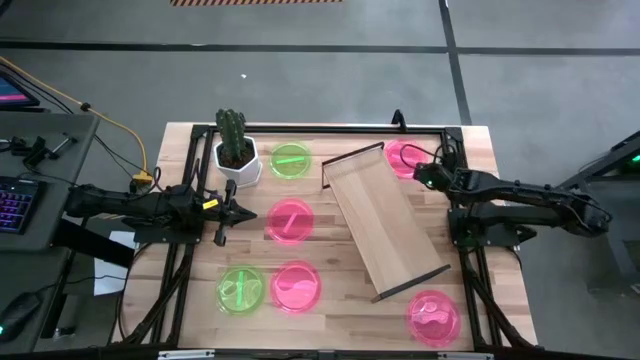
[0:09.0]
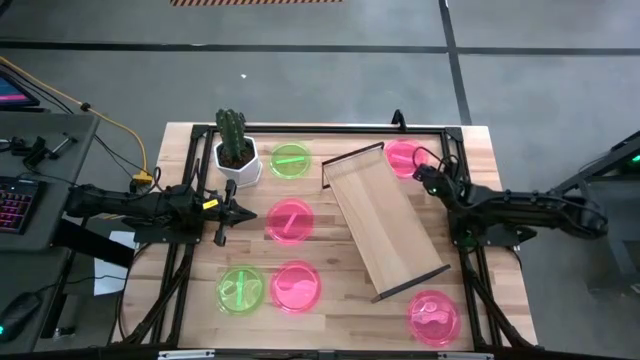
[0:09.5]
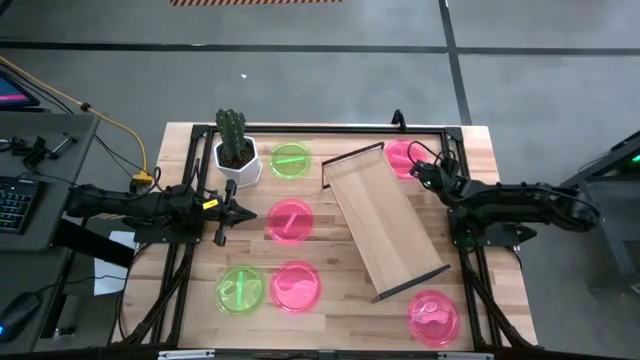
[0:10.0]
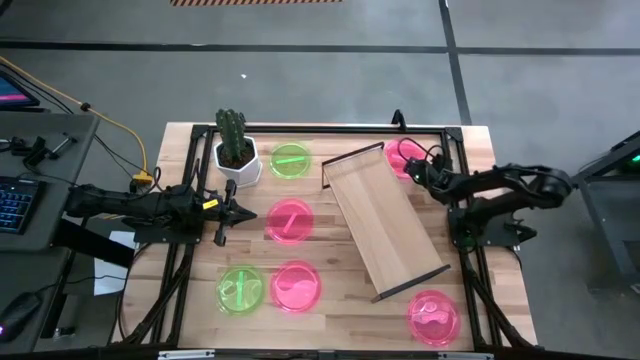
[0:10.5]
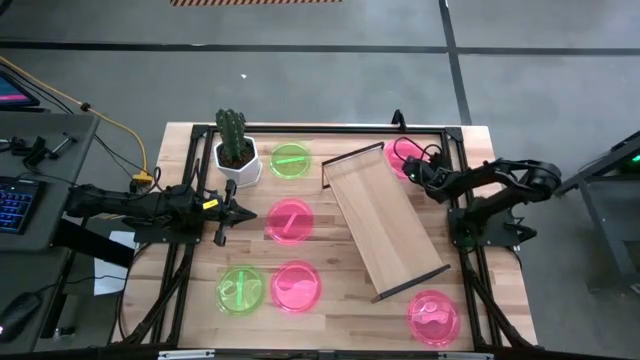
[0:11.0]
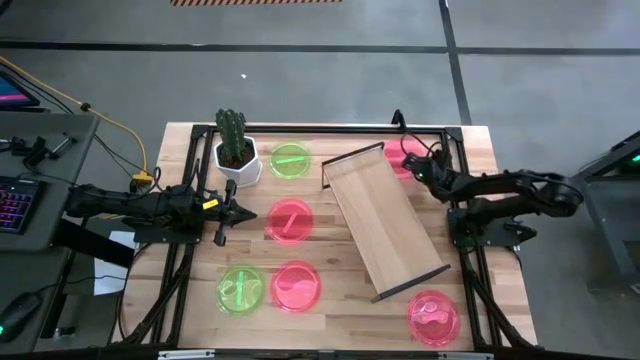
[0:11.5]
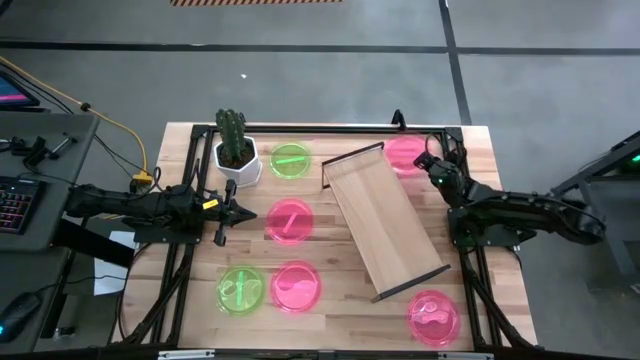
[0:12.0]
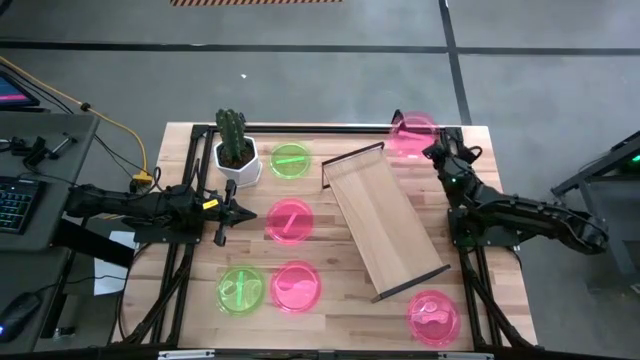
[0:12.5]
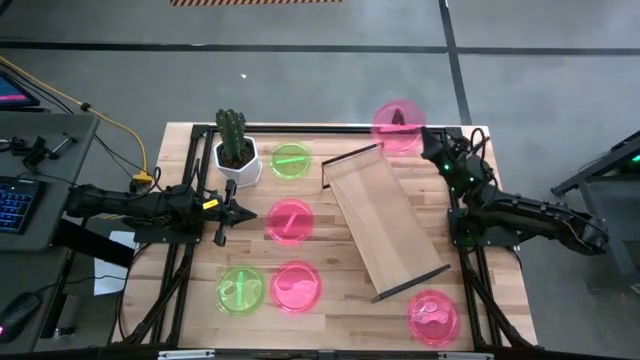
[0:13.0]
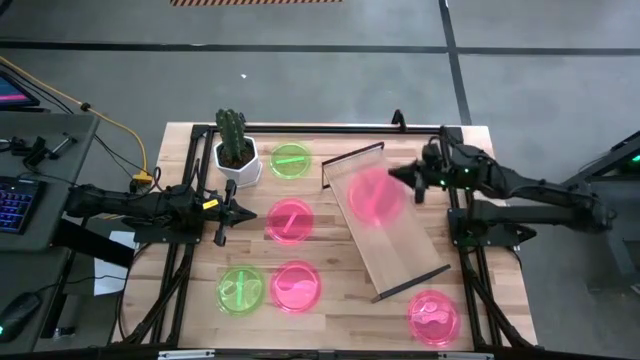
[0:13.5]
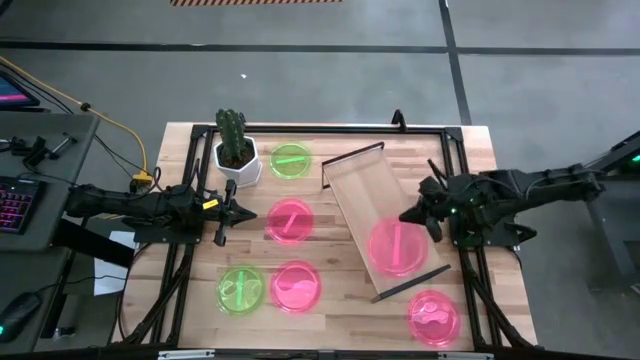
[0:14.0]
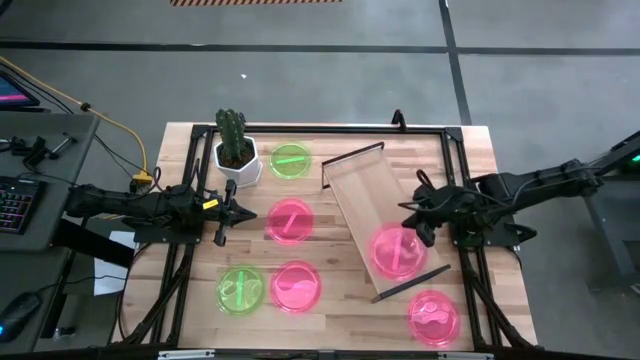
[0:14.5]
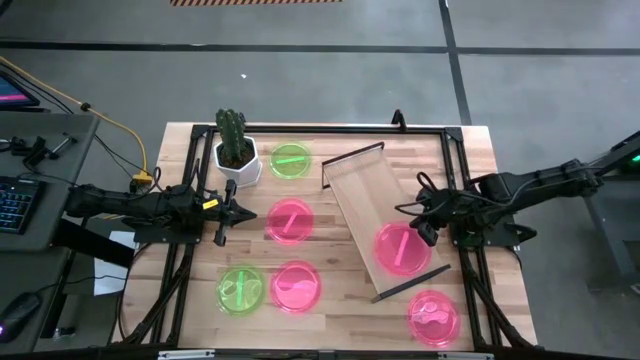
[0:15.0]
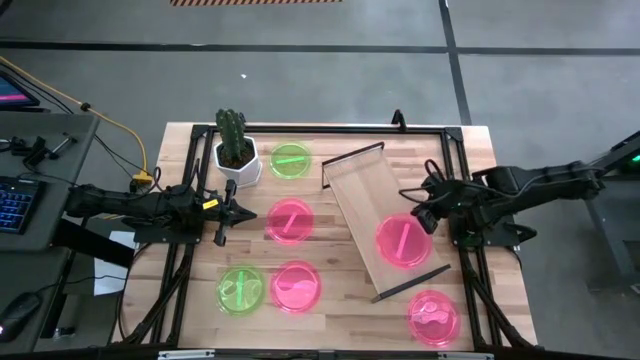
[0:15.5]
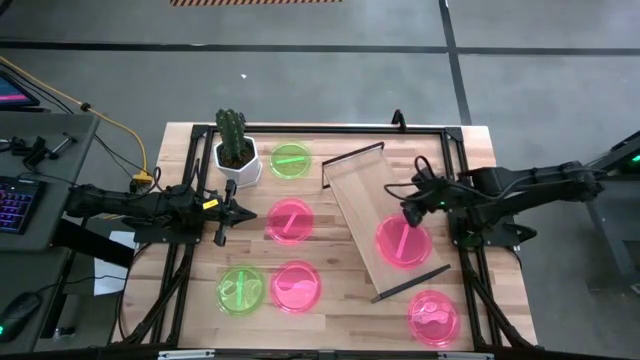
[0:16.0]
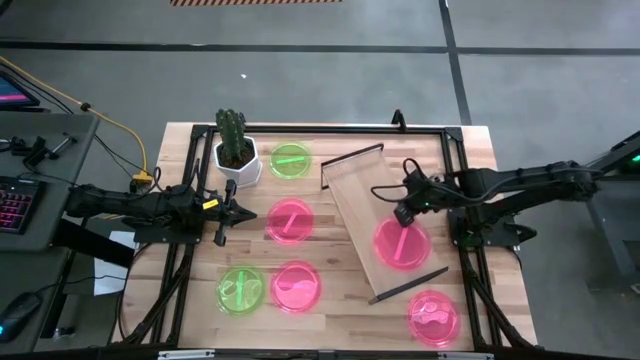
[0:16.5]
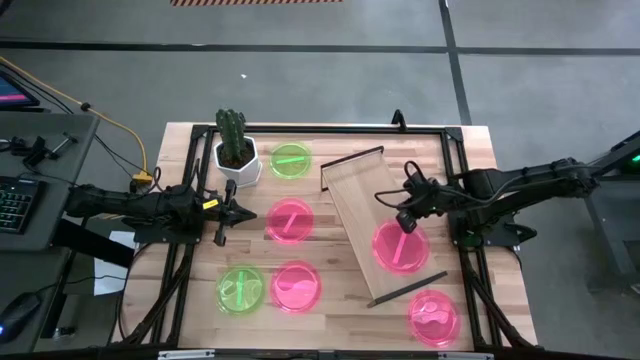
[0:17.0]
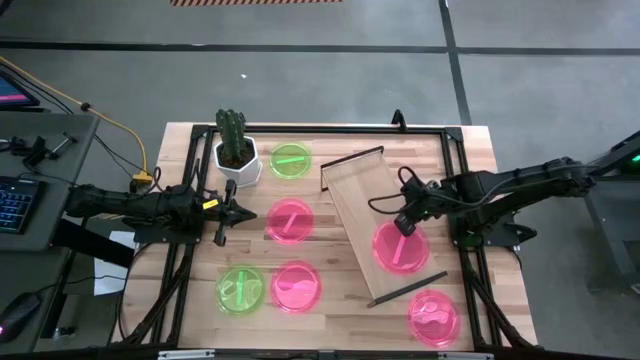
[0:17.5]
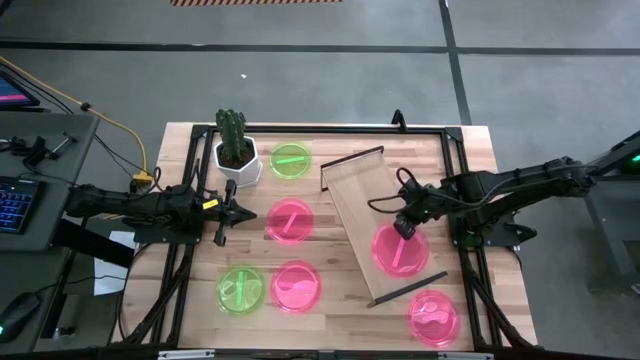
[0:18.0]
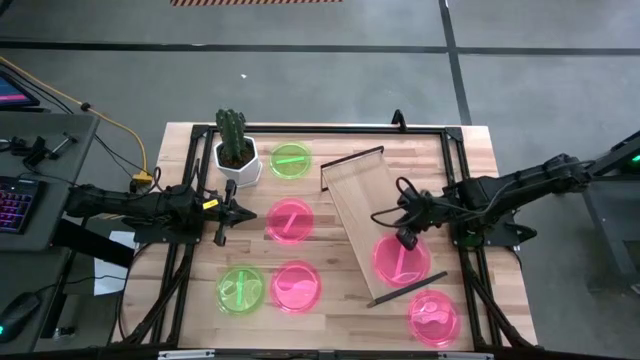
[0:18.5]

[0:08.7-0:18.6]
Task: Place and stack plates onto a shelf
Put the top right pink plate on the shelf

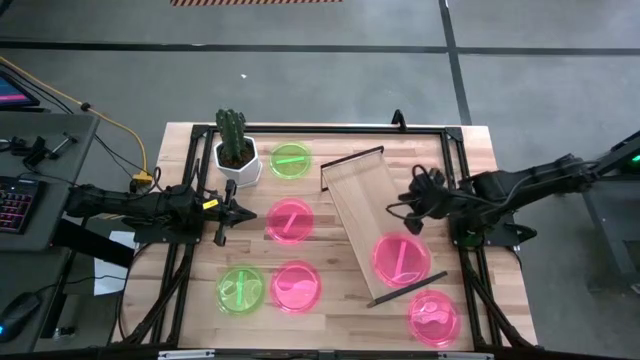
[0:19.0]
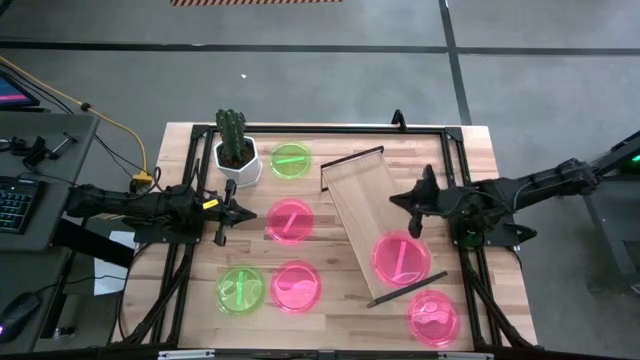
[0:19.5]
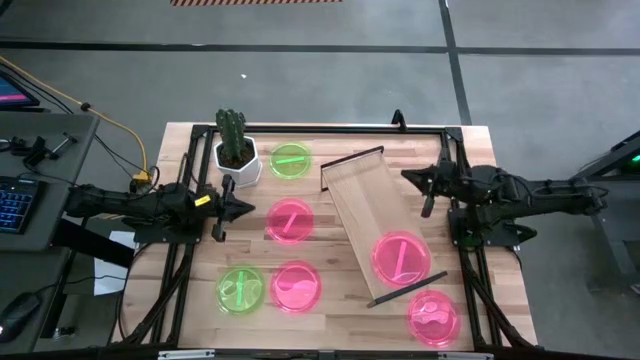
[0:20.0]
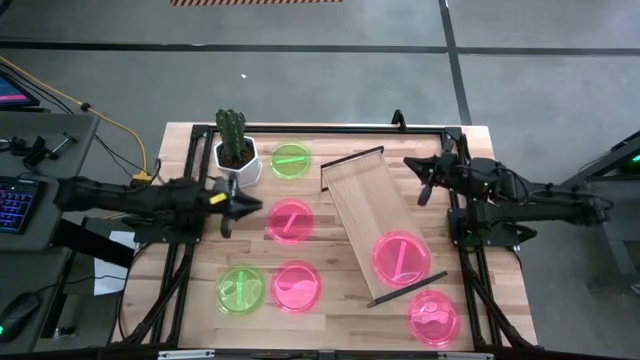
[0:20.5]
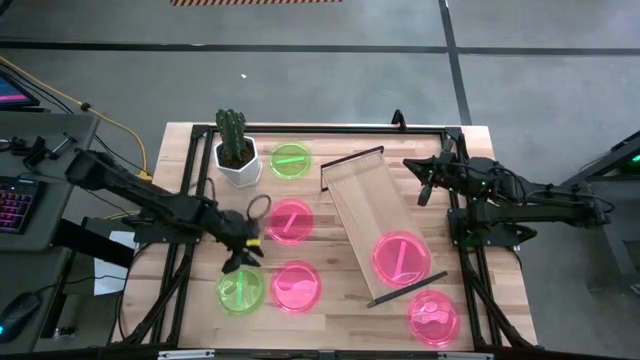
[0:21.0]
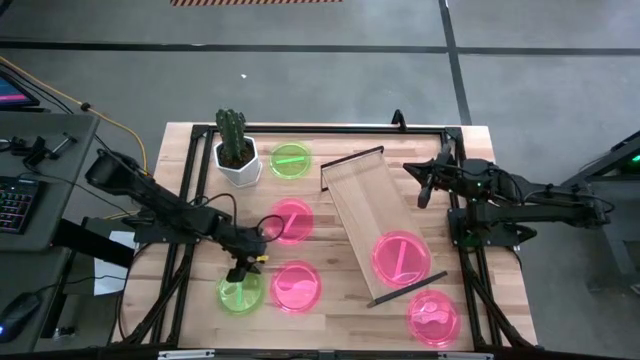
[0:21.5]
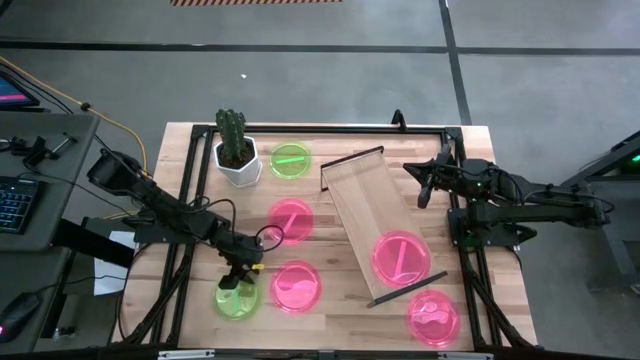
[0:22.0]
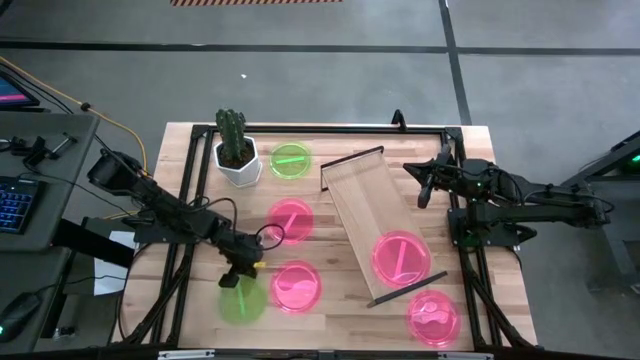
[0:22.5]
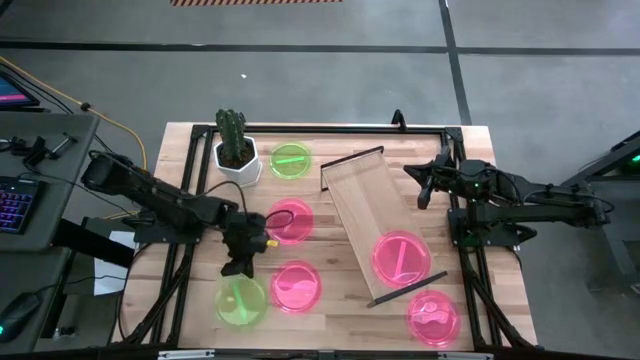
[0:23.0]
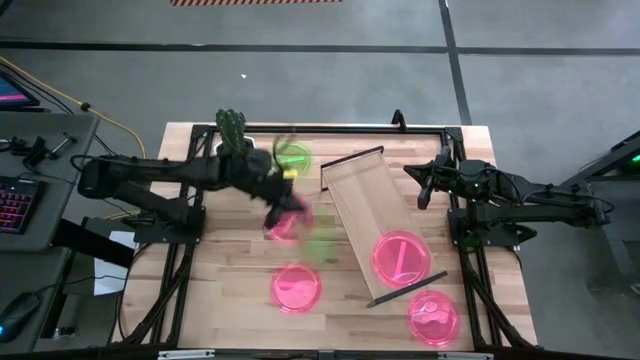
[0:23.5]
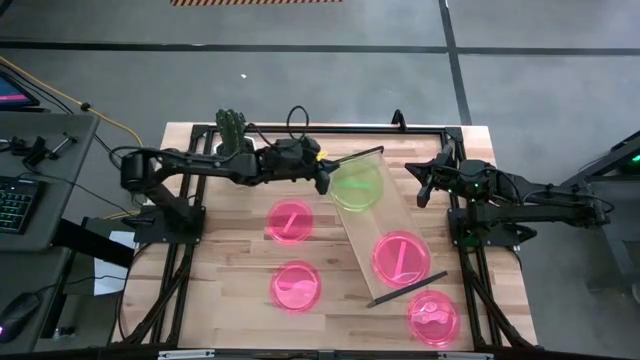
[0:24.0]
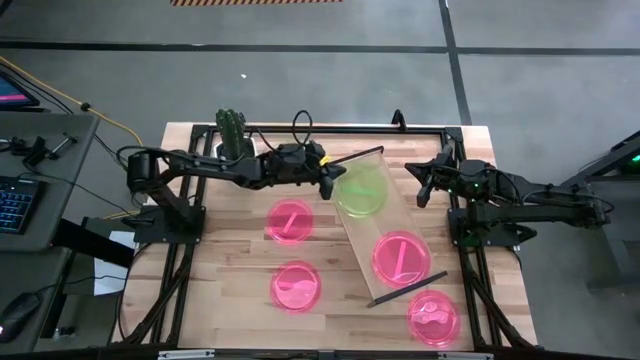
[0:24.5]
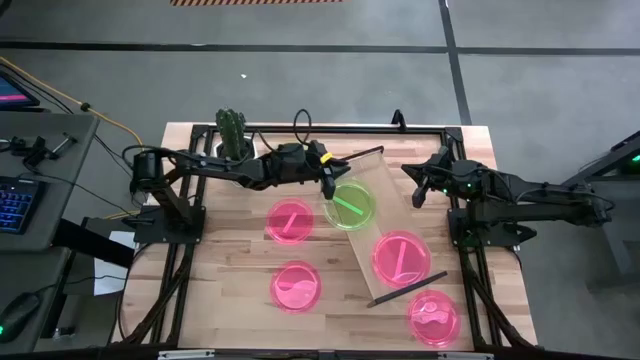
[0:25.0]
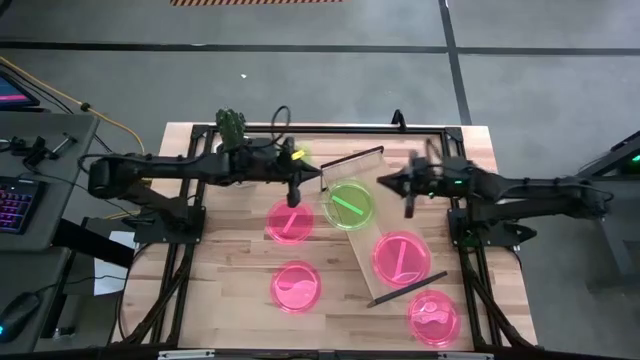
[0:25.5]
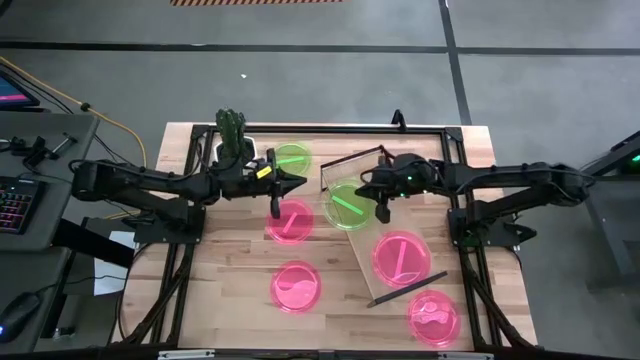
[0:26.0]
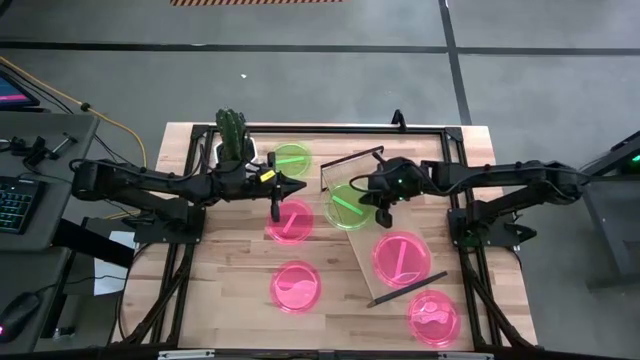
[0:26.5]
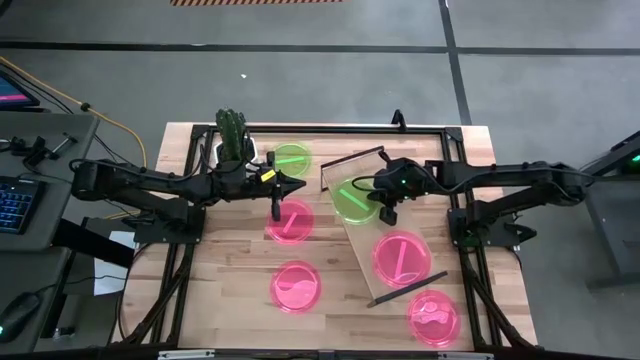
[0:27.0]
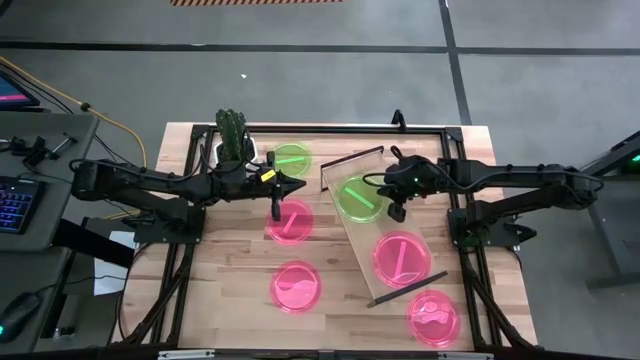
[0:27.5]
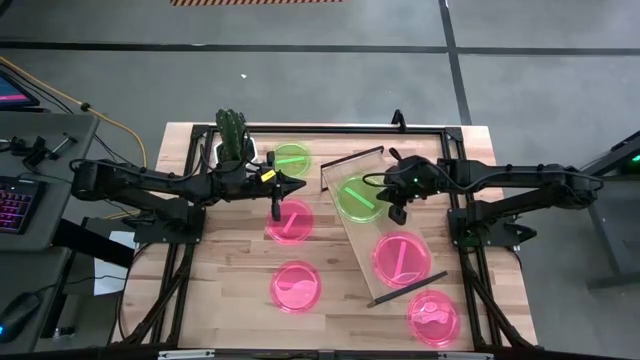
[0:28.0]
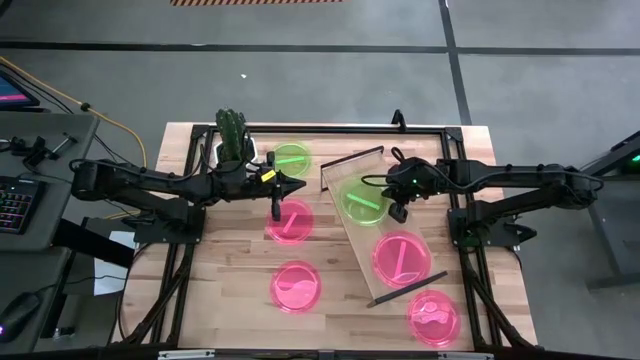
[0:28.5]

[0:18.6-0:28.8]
Put the bottom green plate on the shelf

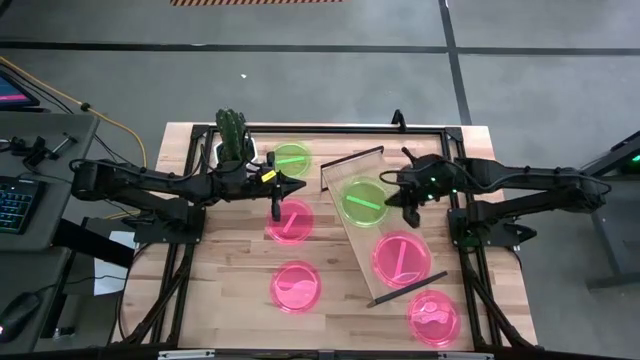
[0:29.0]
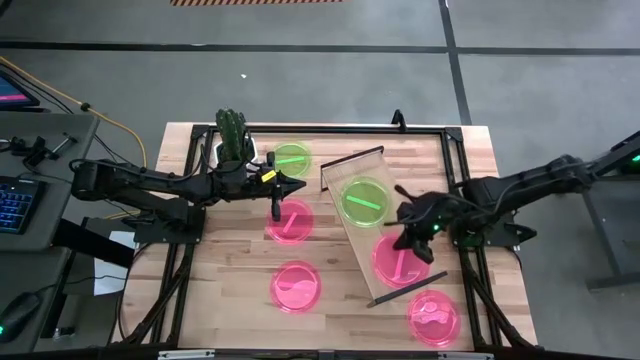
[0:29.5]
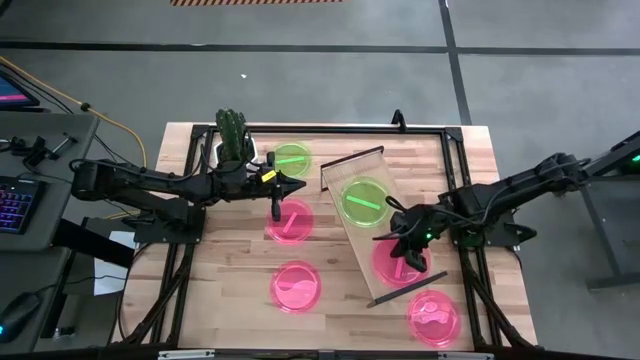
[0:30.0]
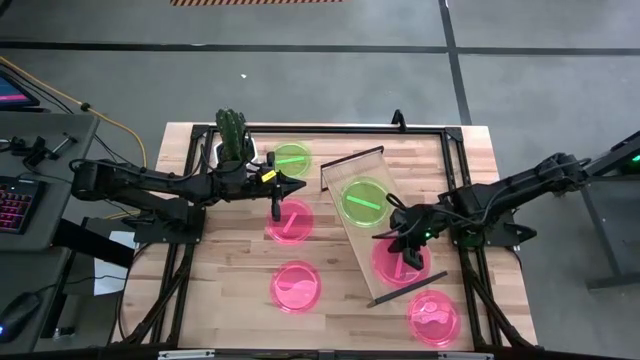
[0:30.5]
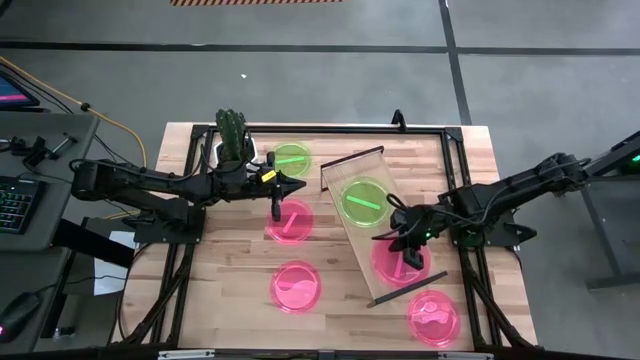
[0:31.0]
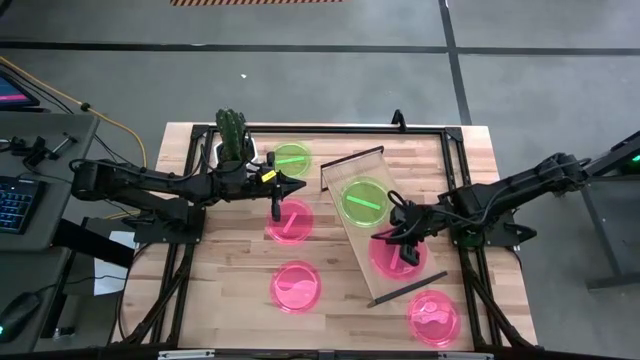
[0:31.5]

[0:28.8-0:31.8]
Adjust the pink plate on the shelf
